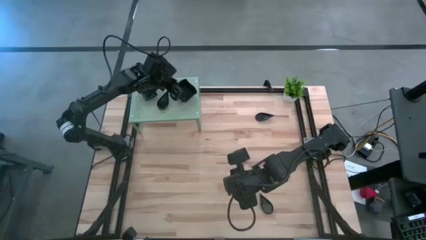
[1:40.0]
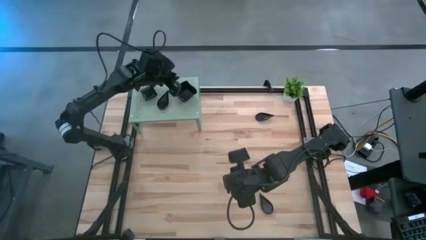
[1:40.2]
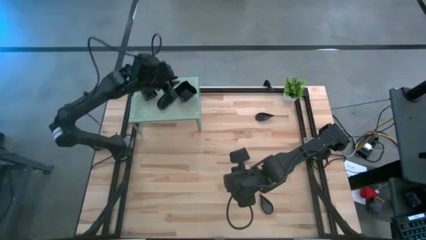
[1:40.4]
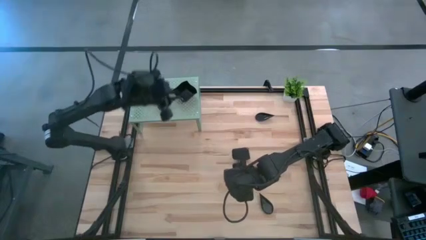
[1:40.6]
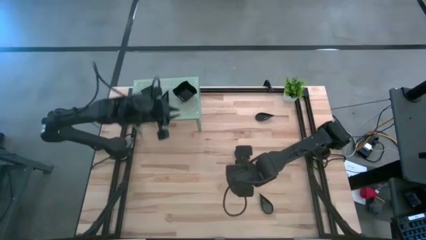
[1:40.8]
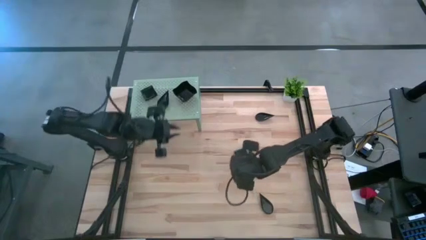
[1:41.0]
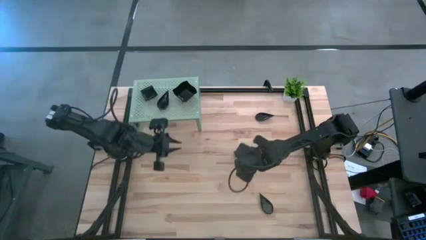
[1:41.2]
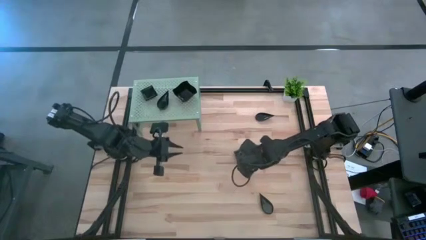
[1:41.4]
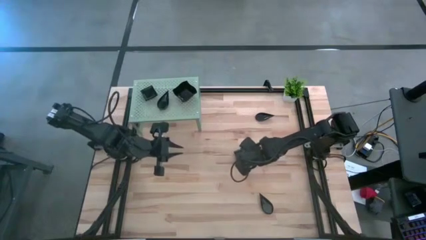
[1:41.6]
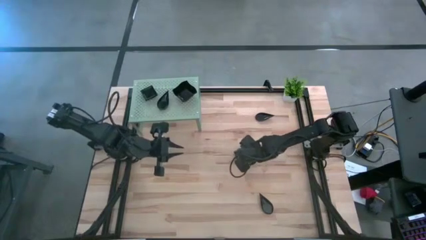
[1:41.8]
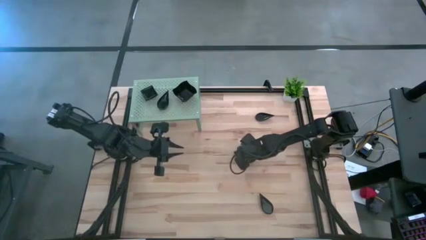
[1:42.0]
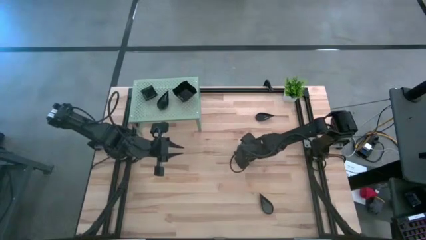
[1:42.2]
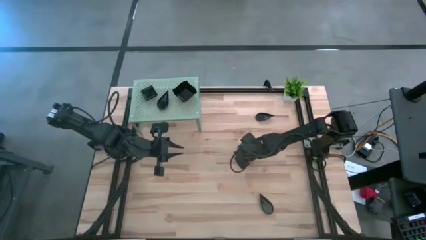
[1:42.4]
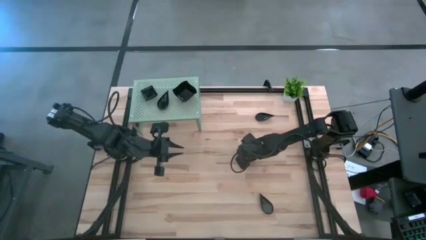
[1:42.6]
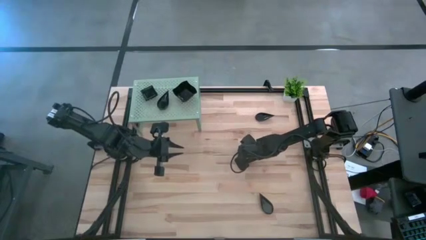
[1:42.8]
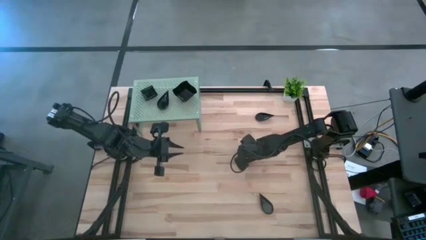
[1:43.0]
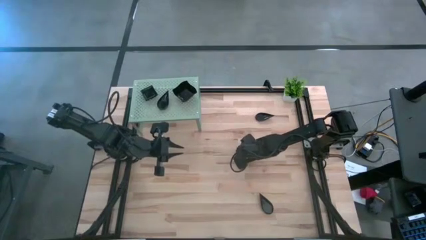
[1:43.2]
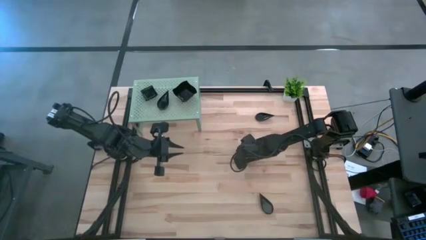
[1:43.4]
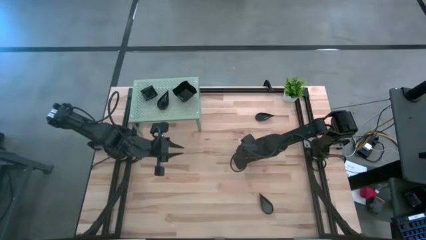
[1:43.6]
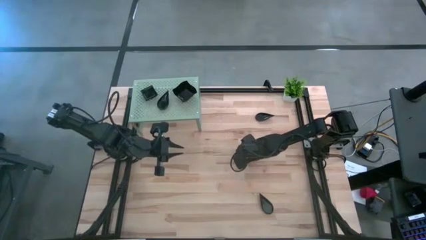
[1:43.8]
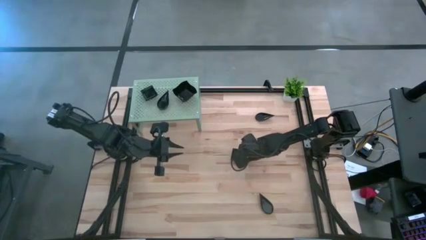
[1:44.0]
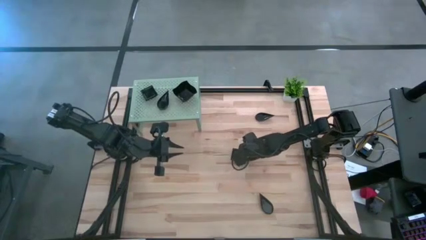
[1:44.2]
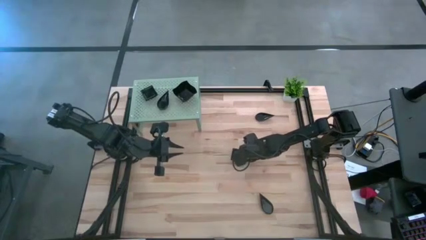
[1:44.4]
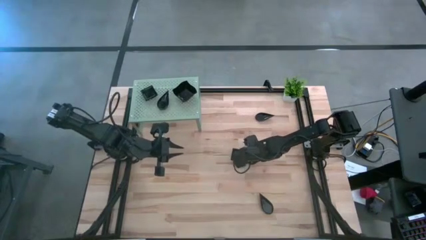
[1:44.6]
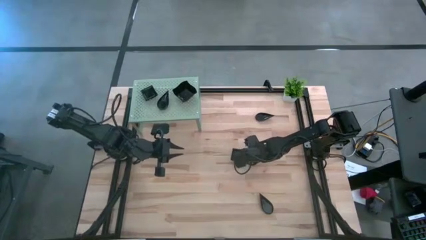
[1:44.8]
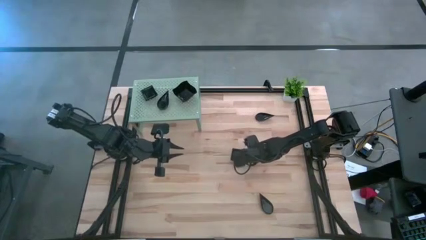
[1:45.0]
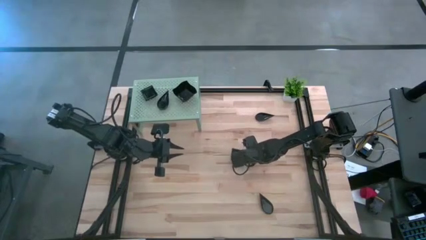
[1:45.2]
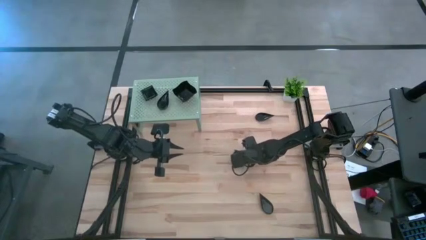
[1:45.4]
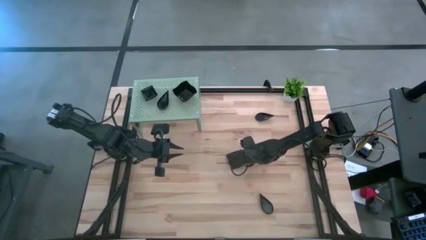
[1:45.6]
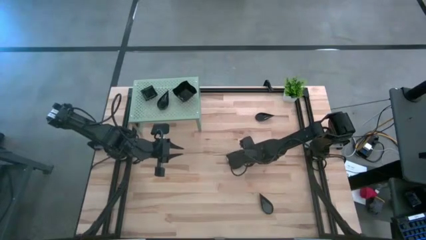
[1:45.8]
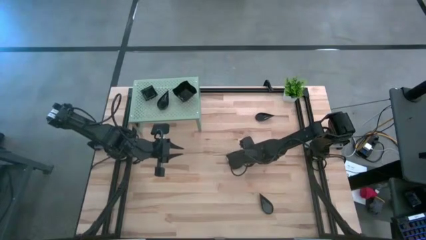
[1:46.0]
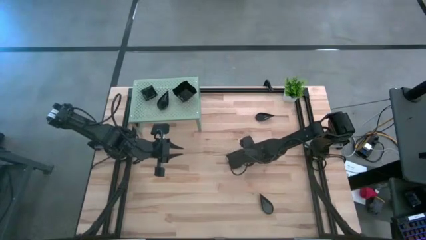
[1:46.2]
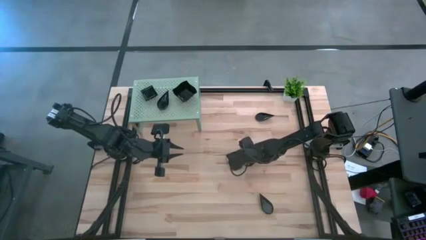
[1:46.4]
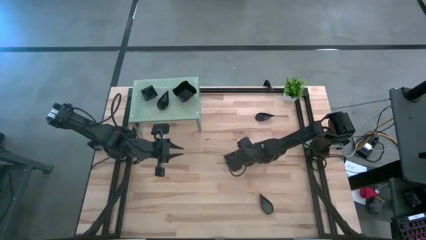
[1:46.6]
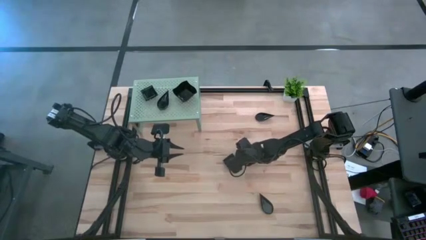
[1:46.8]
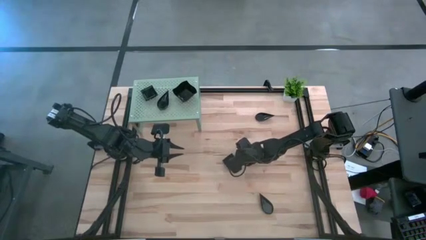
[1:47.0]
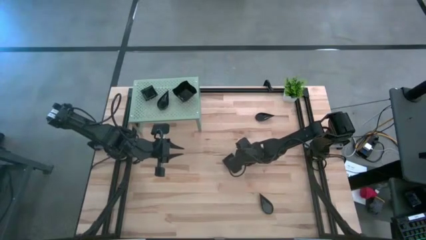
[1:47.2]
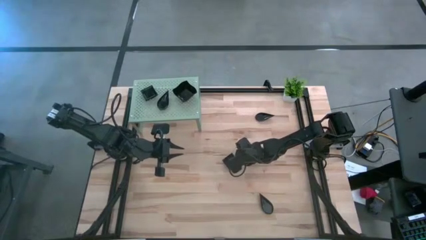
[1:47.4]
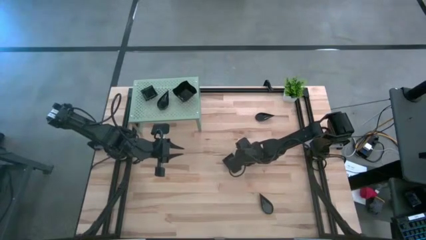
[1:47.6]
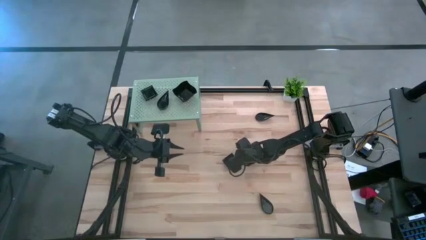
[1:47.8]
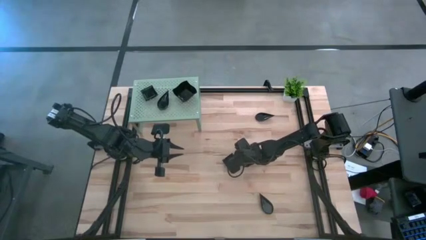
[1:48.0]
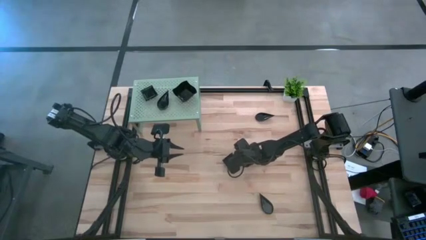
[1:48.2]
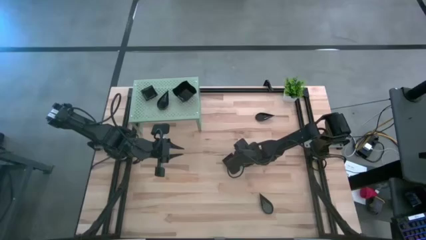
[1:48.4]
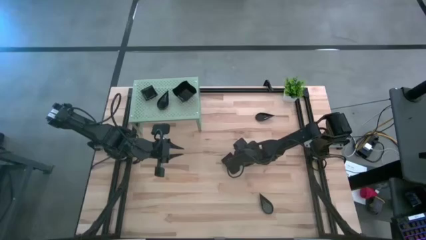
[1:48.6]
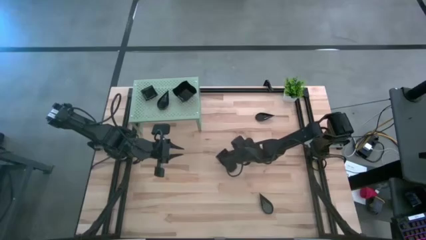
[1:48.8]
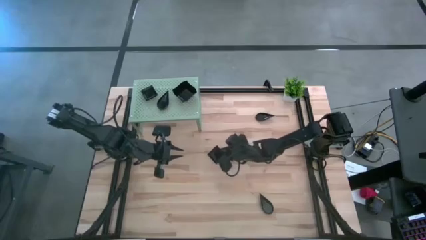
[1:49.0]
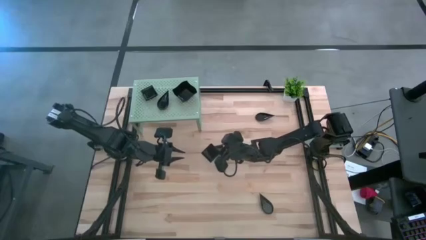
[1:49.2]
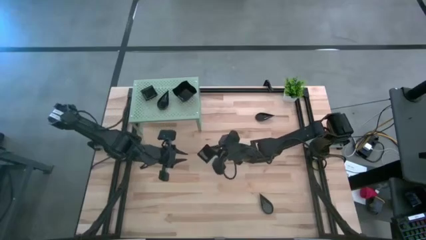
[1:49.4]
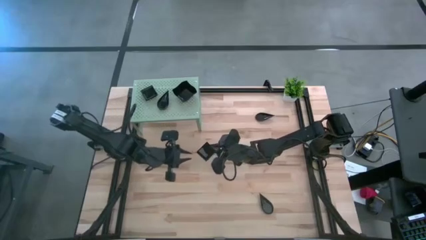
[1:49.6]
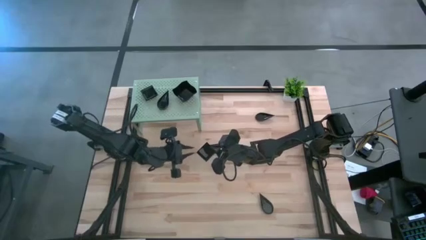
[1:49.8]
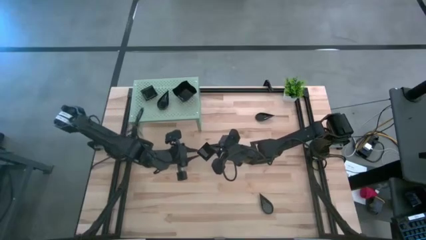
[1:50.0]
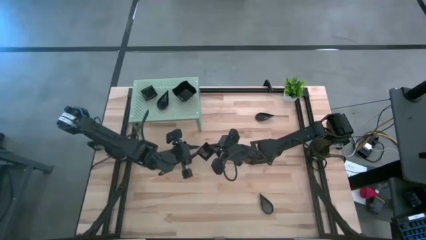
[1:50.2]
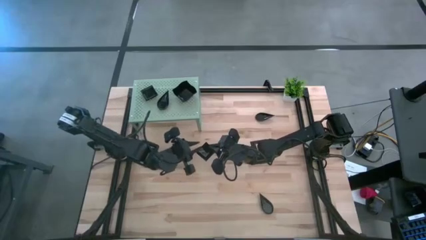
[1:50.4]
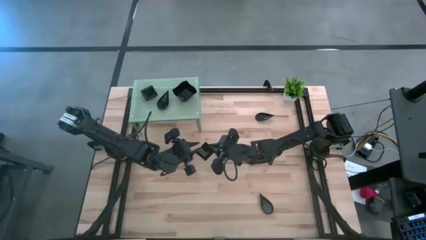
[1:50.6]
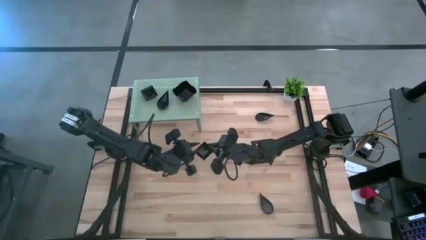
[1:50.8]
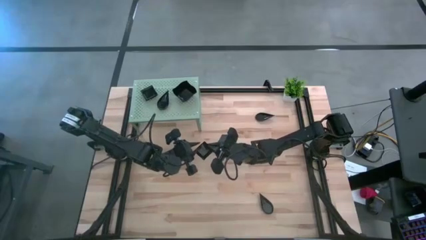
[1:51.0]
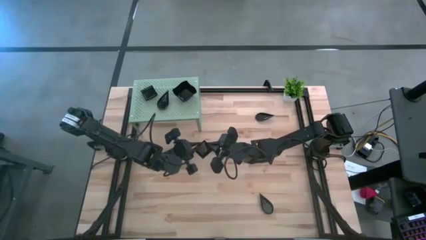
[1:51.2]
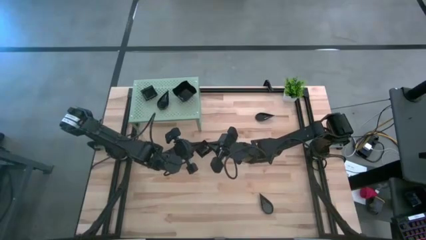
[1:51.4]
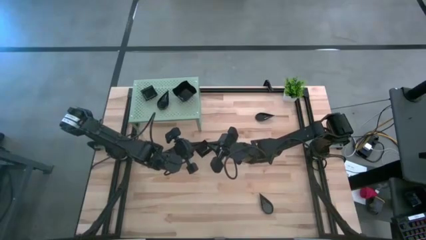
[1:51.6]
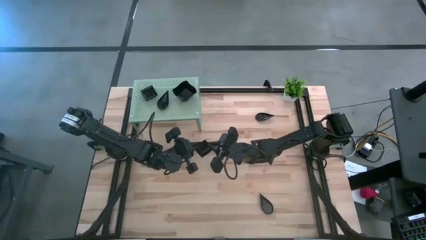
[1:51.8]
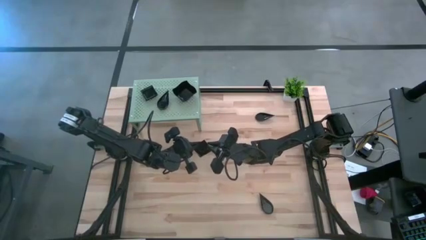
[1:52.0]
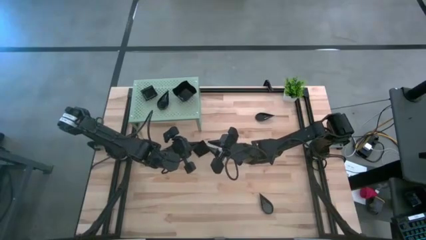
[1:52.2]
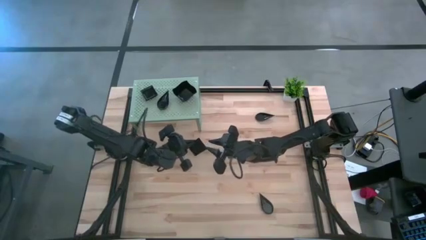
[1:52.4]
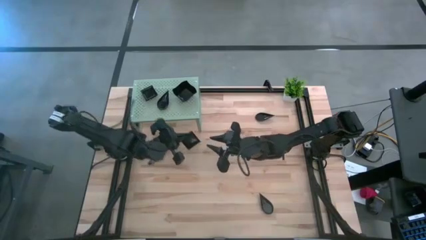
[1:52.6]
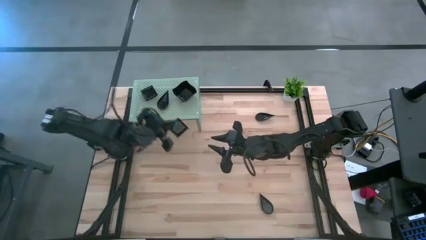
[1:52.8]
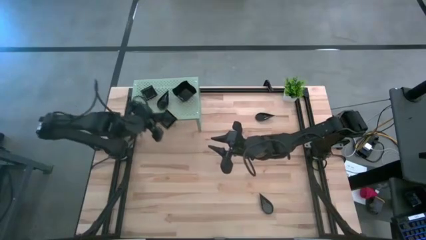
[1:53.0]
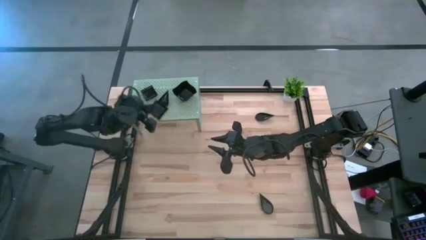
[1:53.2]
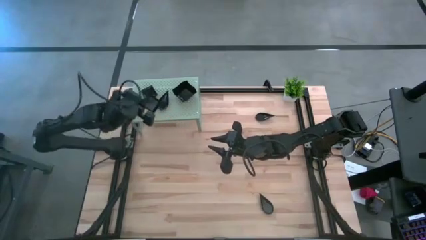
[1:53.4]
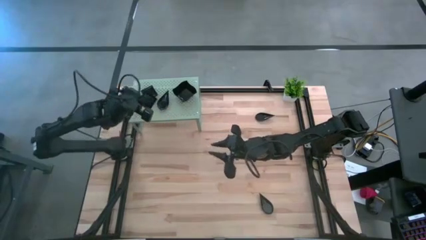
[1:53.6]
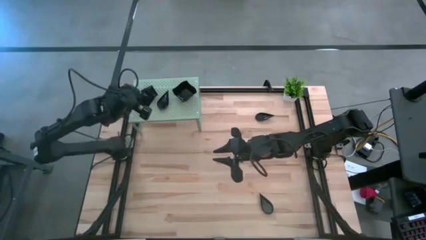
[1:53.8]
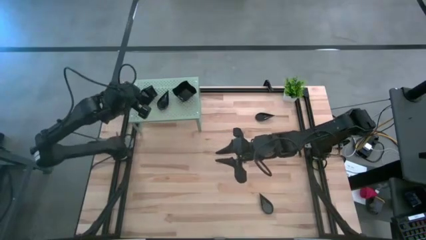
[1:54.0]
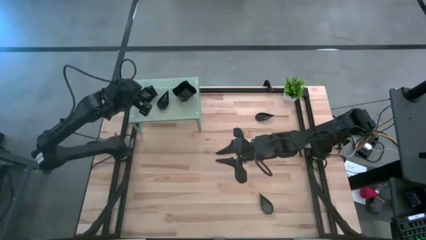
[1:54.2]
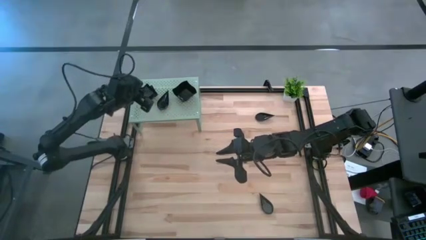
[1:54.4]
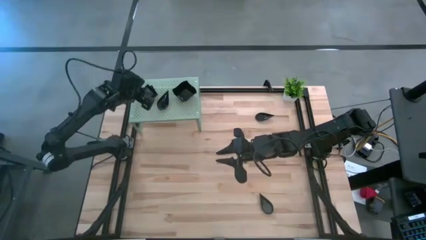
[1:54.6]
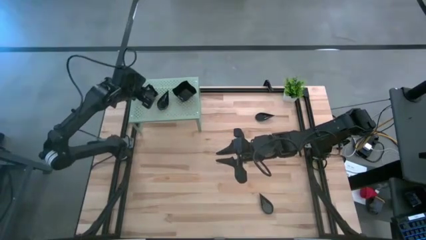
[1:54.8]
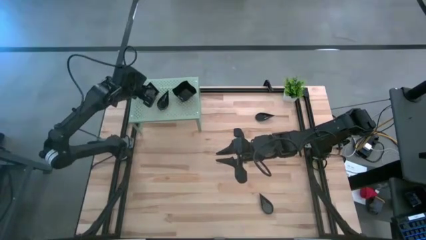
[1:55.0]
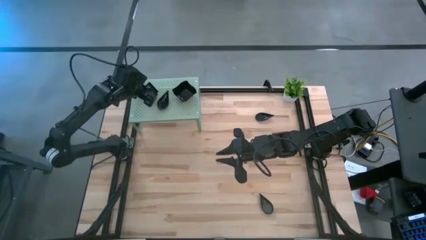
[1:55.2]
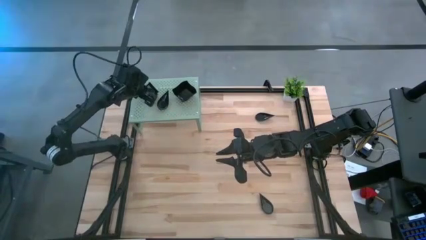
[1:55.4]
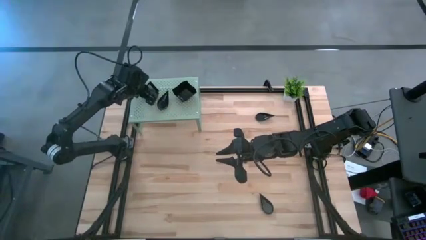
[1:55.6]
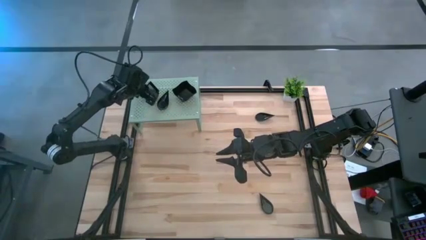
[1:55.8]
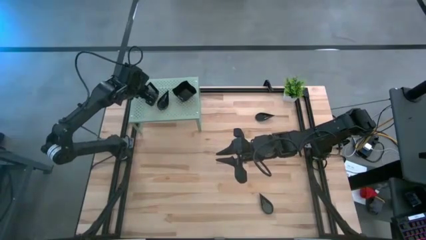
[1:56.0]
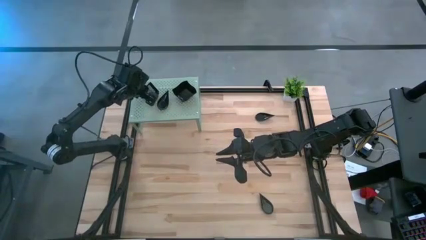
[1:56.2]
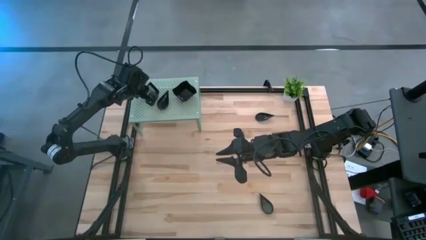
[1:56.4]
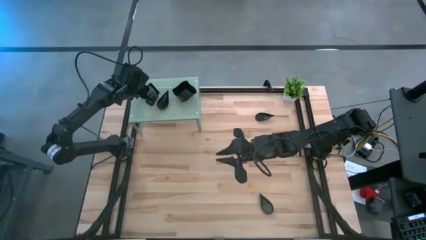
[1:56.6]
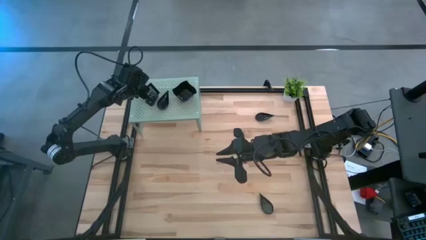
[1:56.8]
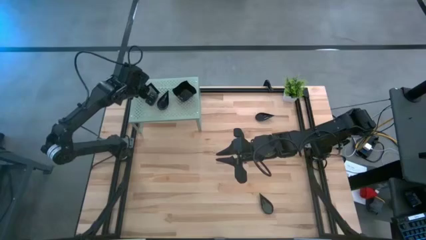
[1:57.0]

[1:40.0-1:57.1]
Task: Pick & Place Mini shaped plates
Stack the black square plate on top of the black square plate on the shelf
